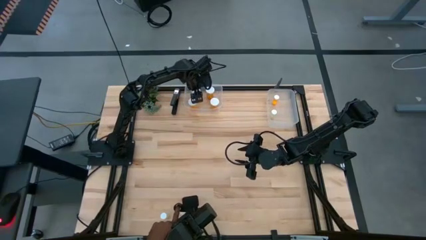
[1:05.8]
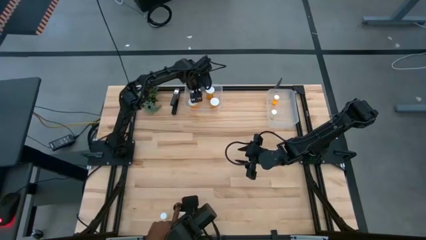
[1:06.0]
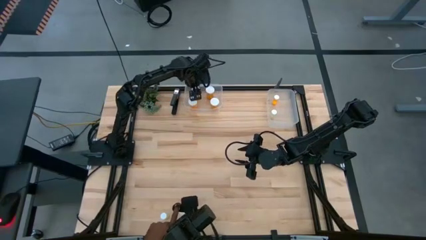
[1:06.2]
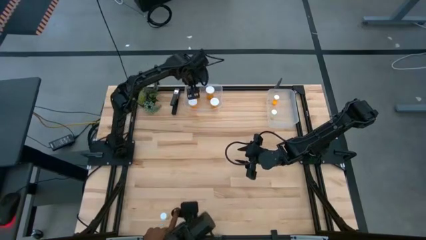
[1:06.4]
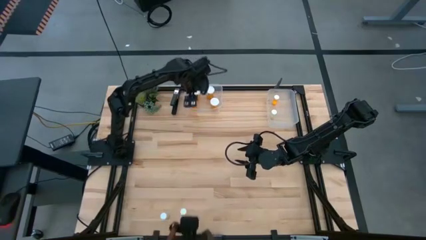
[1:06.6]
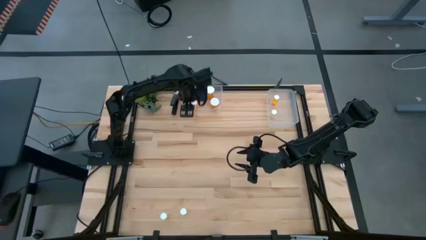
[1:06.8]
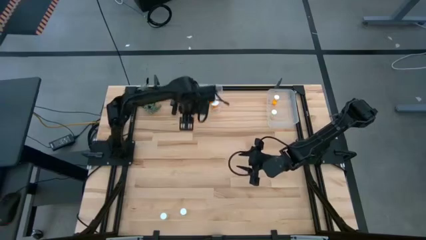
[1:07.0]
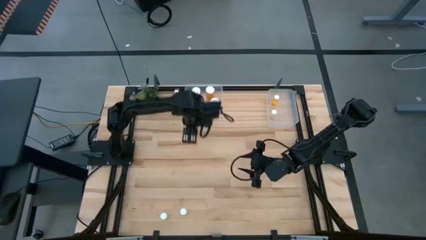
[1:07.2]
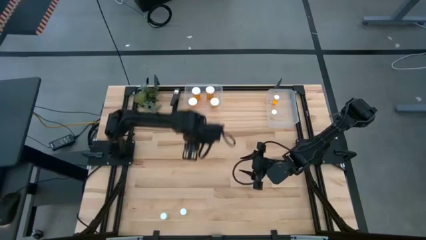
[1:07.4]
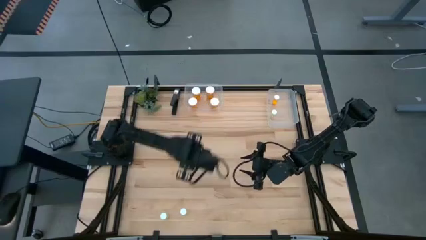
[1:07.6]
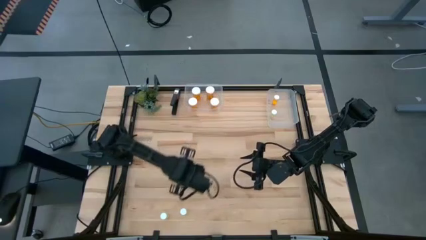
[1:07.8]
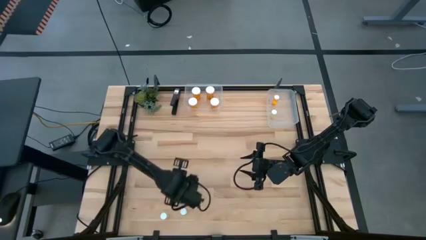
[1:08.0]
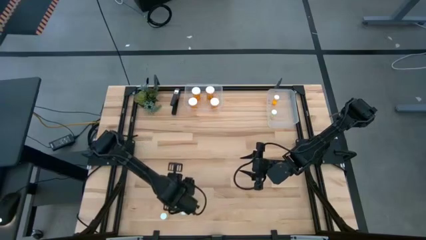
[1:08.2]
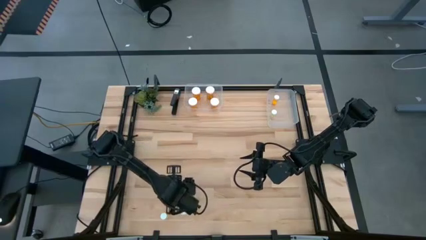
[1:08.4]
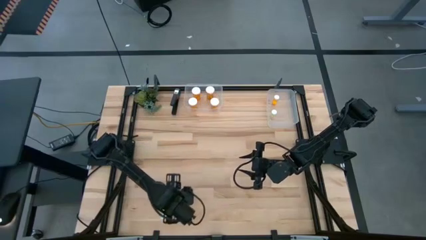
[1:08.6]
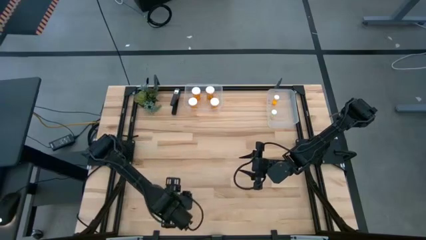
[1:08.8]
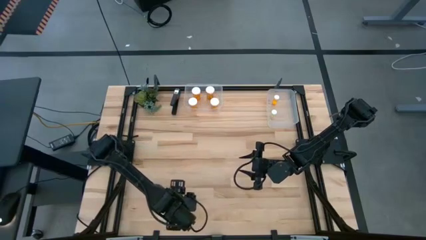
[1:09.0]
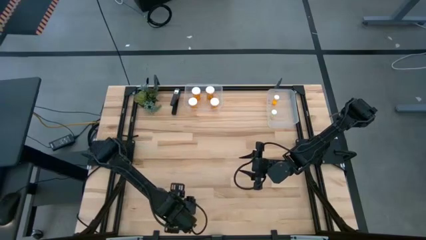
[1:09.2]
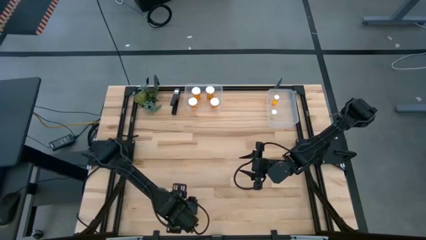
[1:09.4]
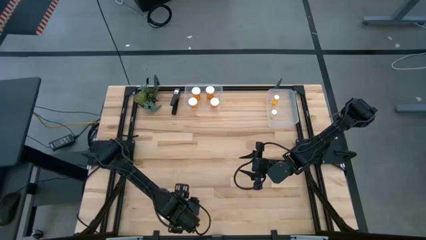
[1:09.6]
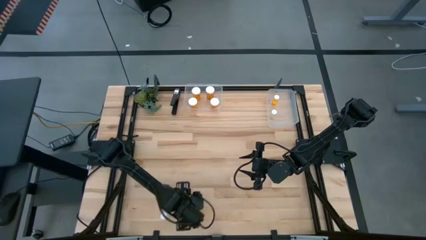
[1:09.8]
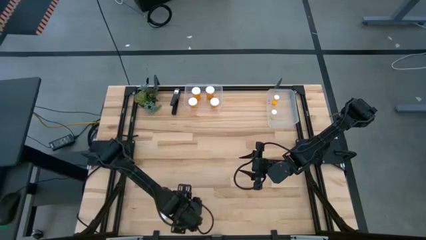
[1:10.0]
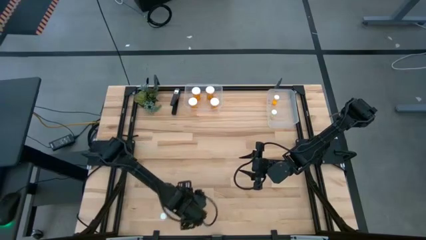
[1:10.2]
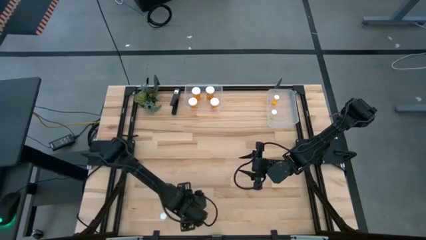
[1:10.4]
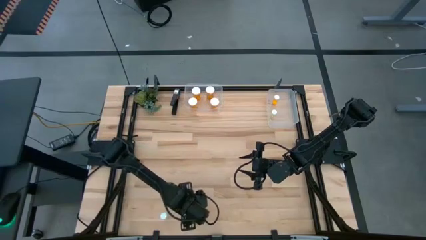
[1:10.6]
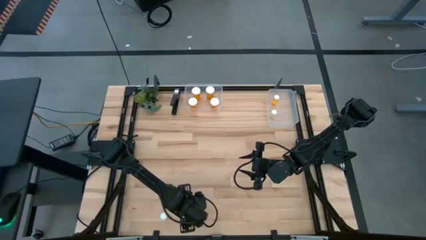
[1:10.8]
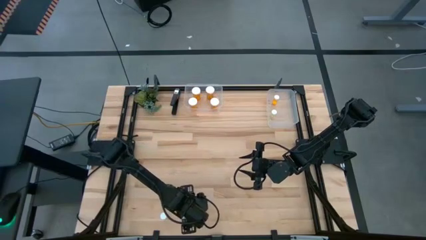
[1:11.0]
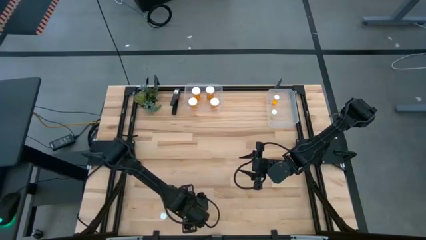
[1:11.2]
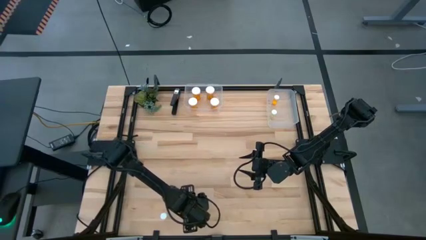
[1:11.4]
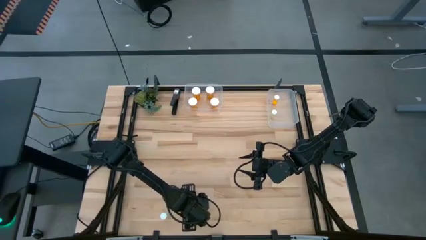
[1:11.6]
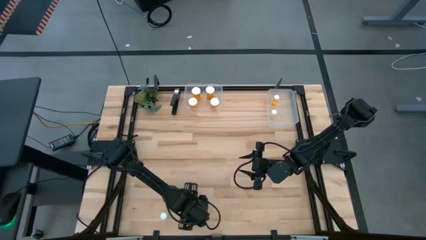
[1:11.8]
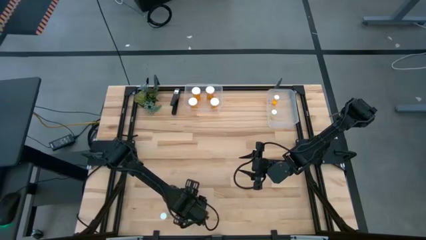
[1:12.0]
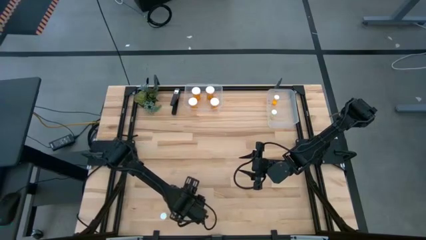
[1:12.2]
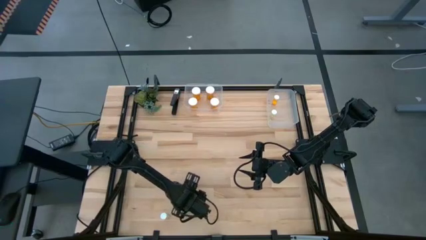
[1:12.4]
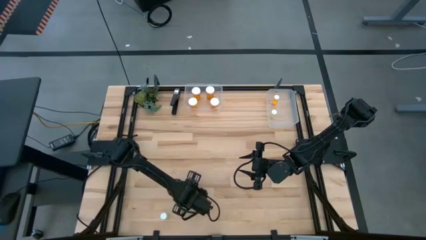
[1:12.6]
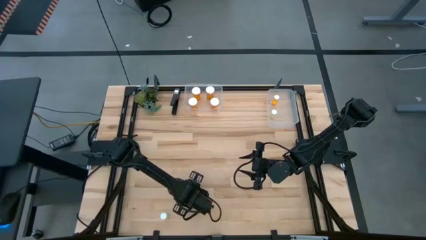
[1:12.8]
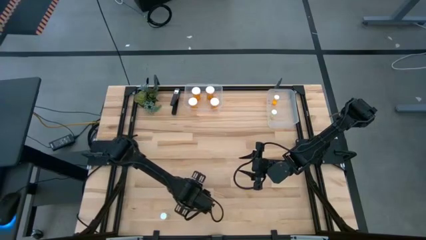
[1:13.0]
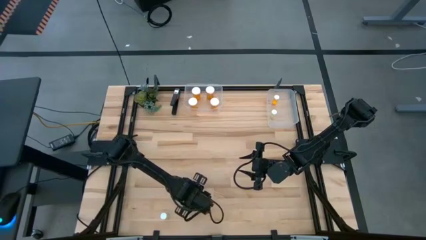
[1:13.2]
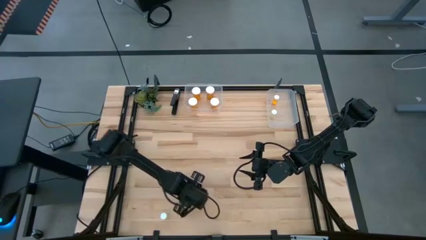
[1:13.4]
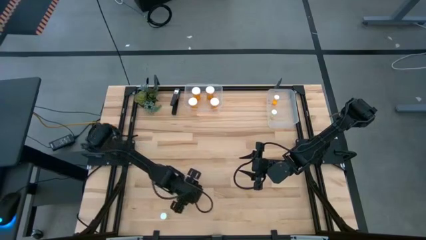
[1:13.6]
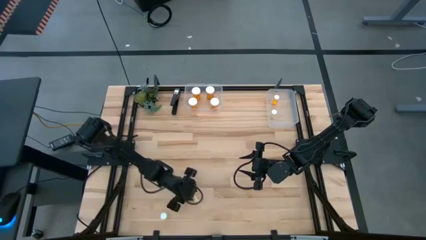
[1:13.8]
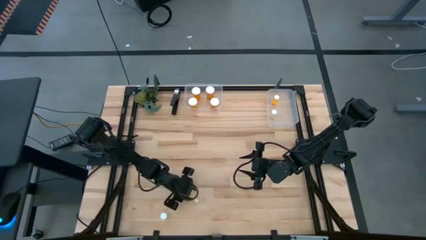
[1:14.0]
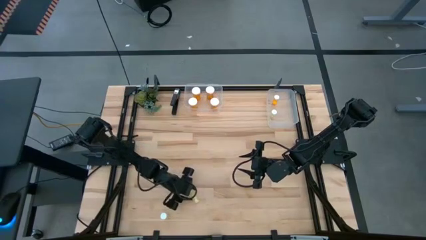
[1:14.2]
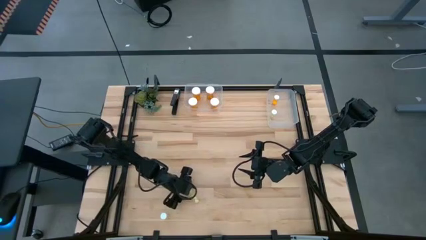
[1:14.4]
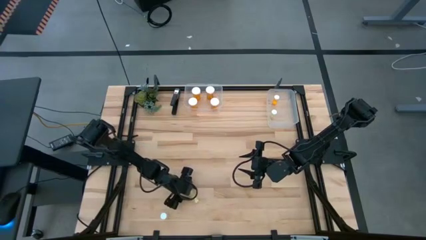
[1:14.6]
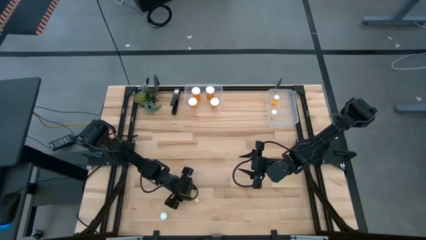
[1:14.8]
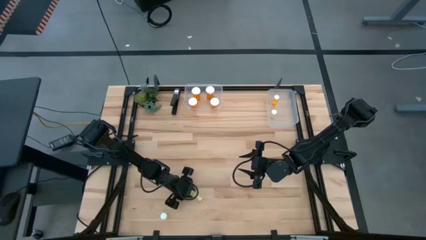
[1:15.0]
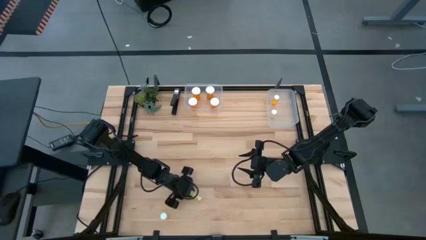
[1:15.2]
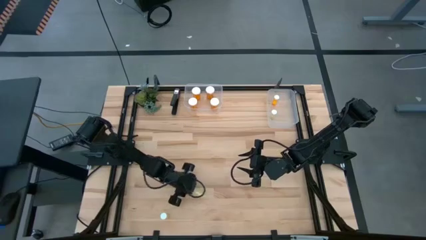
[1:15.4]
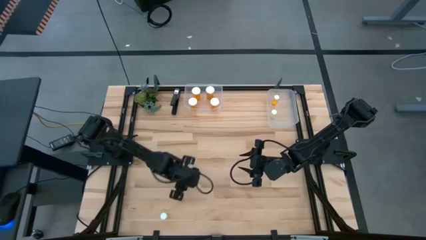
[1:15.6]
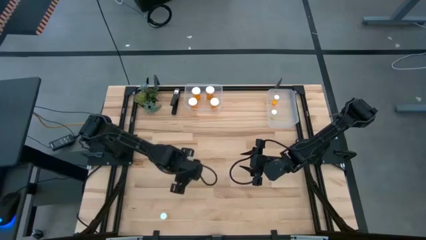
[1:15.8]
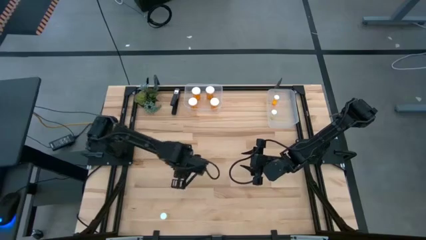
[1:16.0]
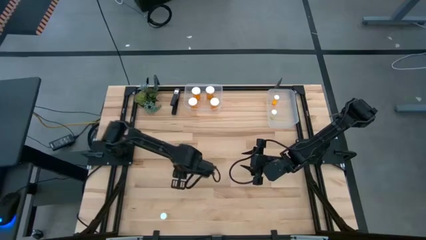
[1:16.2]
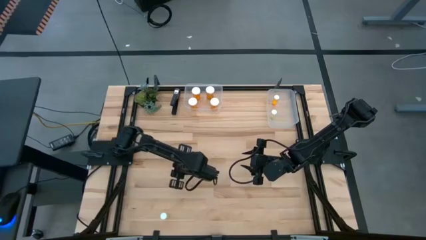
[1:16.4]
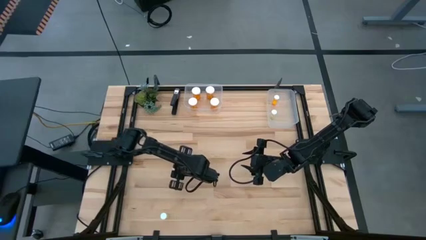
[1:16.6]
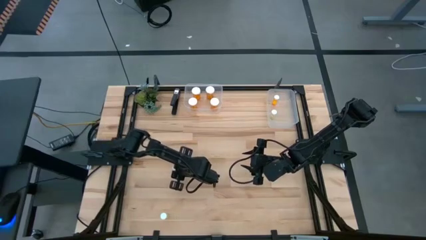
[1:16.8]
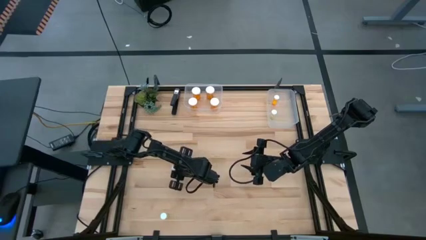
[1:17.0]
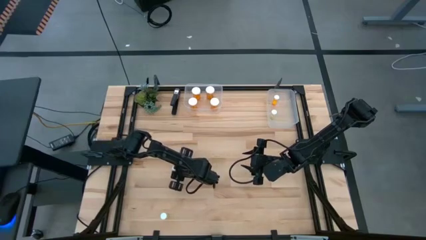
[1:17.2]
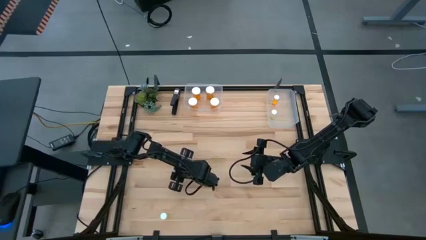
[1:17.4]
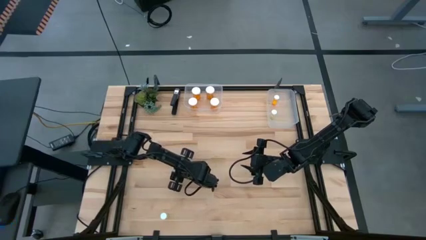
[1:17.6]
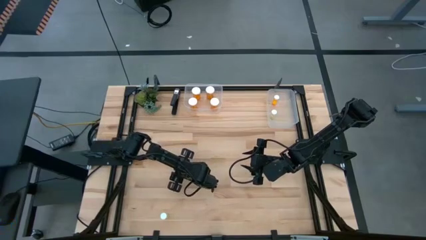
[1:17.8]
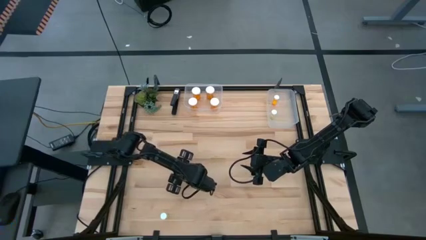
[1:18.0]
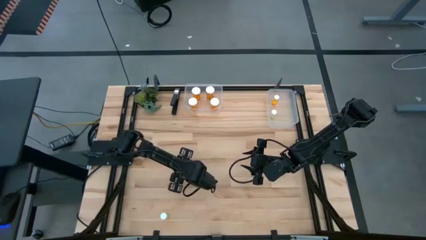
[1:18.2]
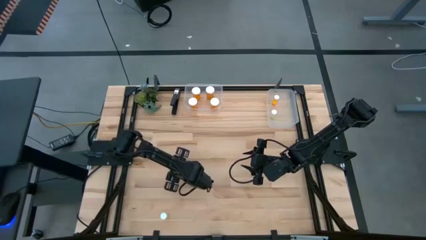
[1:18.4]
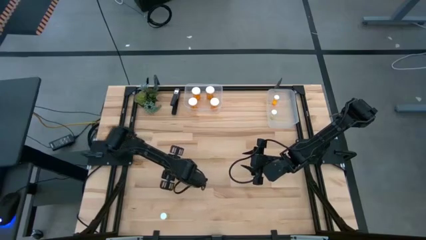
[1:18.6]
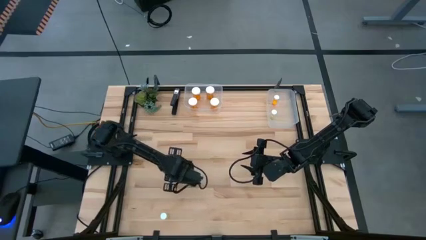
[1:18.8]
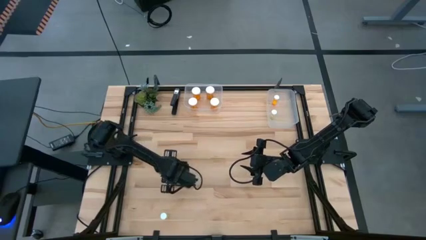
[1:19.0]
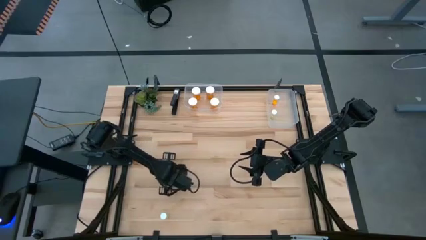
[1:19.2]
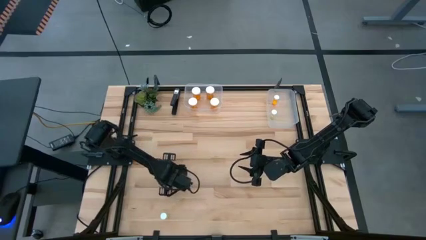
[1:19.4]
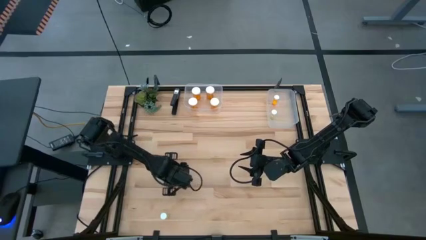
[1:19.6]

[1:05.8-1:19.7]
Task: Pick and place medicine bottles into bin by pill shape (circle, oval)
Put the top small yellow pill bottle into the right transparent bin

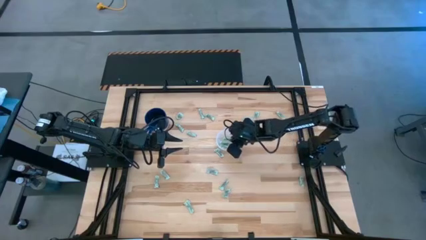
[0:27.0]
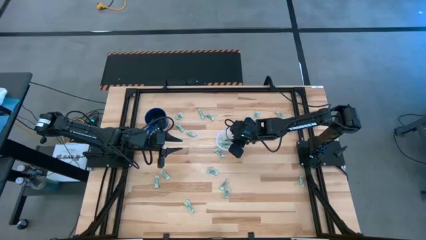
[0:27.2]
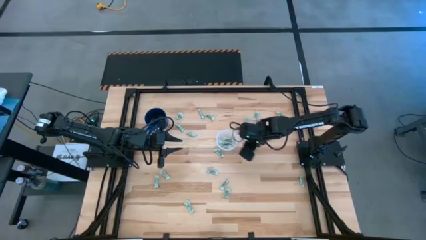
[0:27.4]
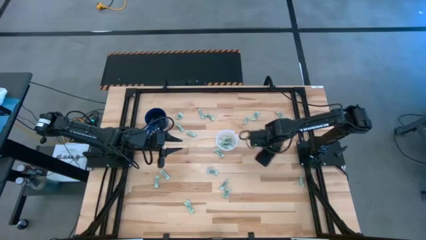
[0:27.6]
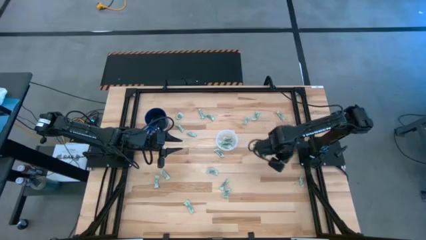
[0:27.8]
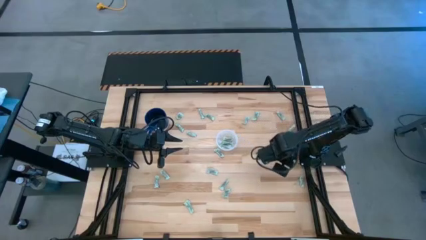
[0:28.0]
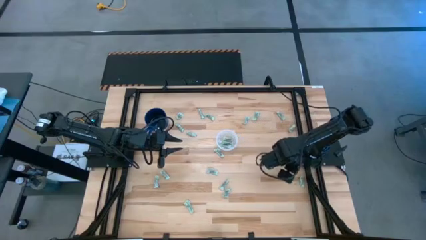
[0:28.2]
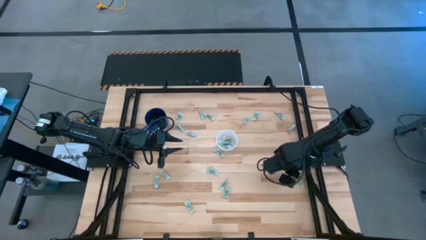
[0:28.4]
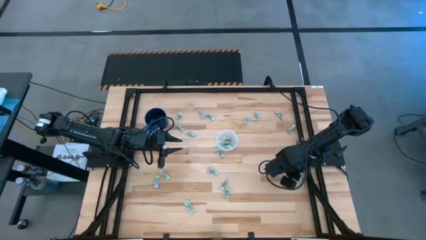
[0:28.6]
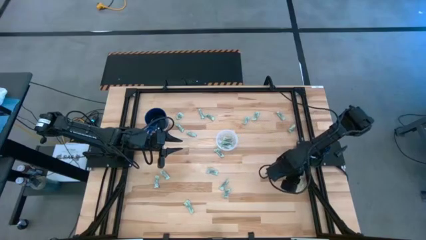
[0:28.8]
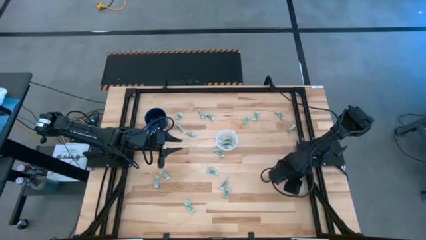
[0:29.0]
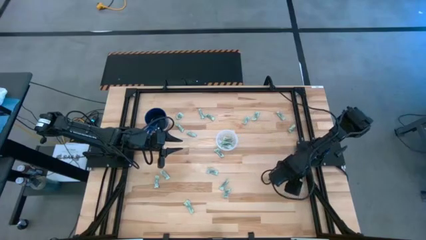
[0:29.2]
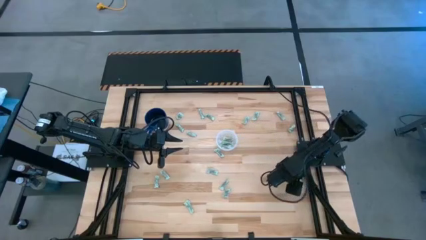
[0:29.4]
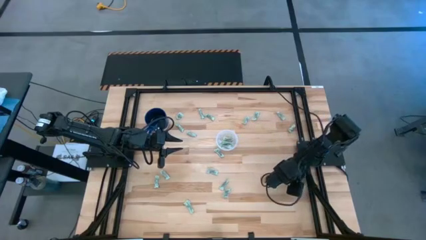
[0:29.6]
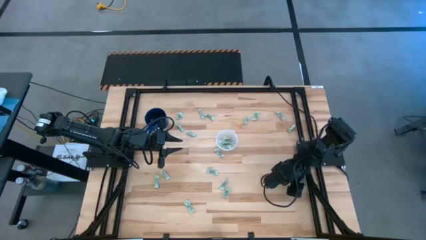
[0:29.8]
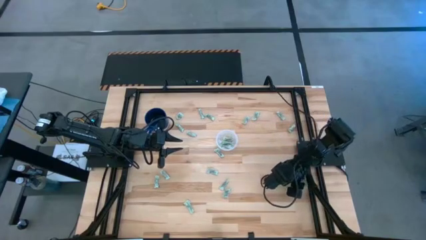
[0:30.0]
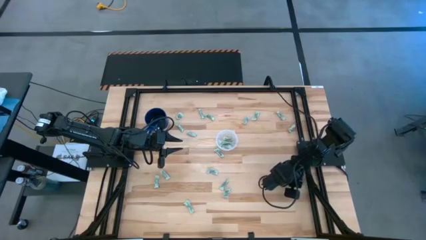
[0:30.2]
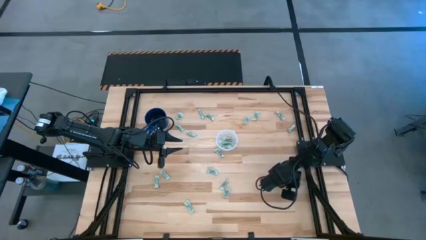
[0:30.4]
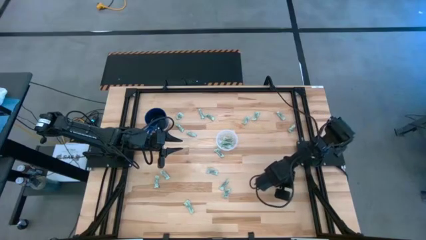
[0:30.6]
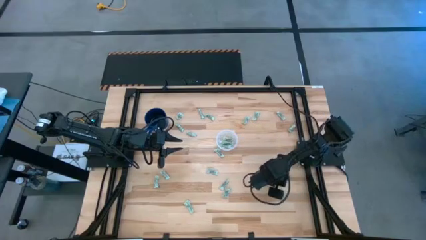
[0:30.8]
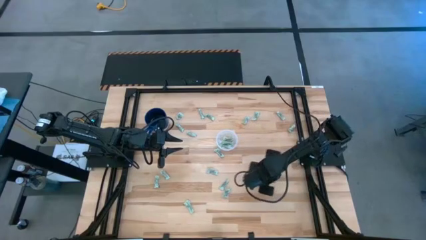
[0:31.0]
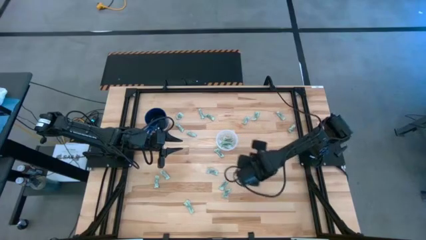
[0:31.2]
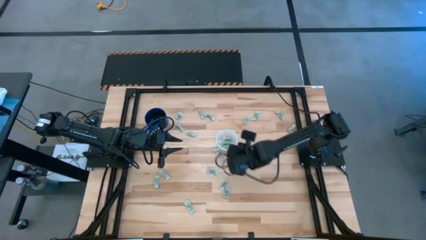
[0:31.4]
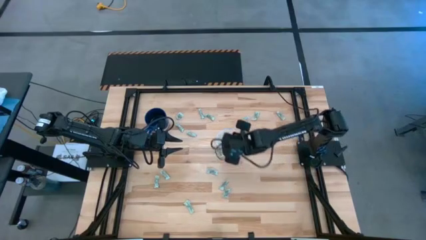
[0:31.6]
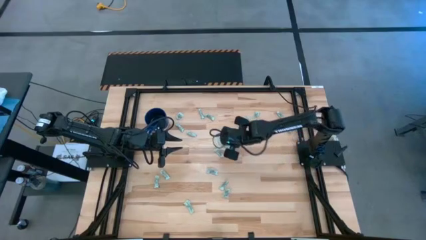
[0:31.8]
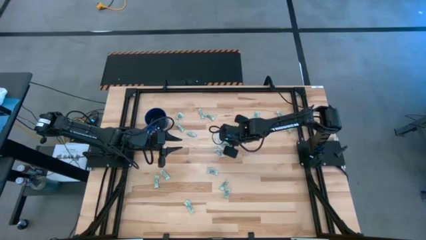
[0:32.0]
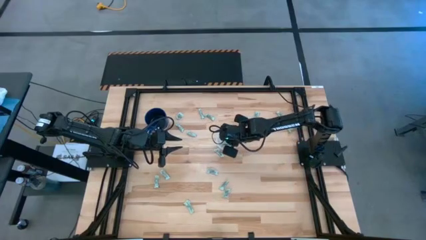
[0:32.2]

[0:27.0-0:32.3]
Task: Pick and place items into bin
Put the gray stevia packet into the transparent bin
